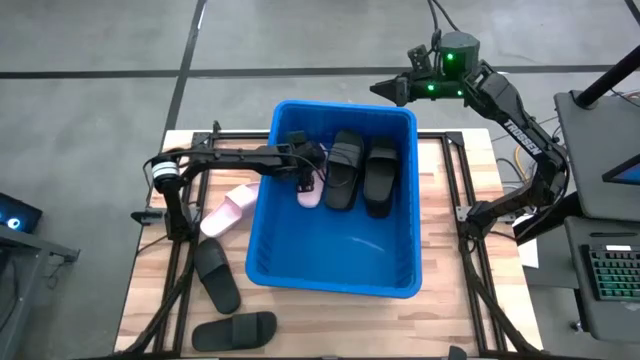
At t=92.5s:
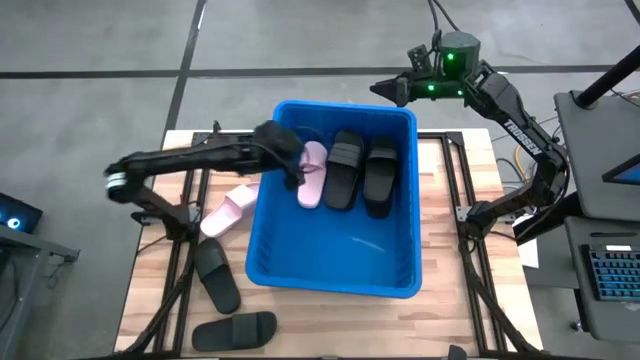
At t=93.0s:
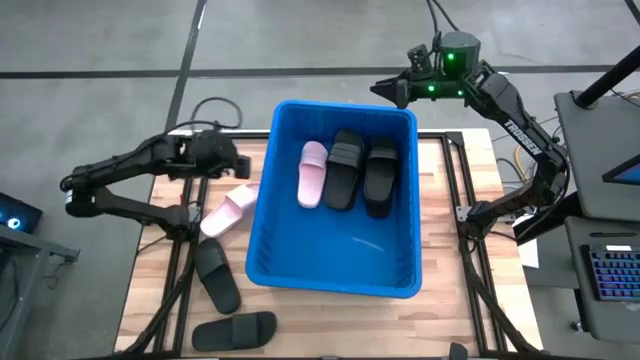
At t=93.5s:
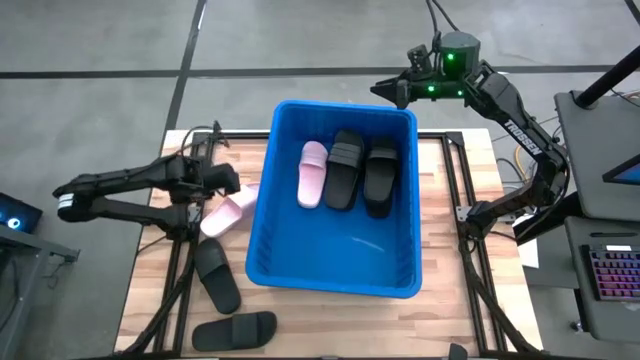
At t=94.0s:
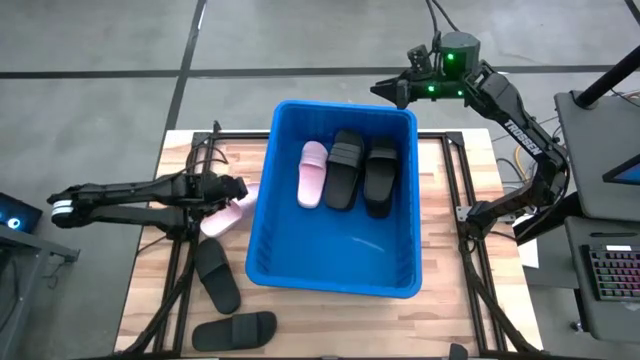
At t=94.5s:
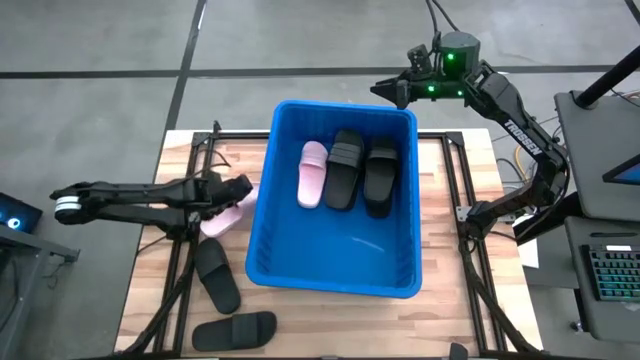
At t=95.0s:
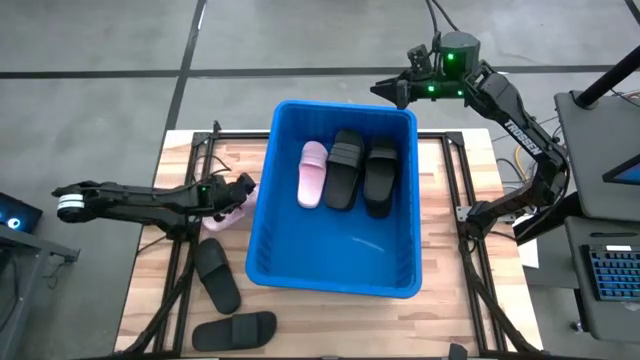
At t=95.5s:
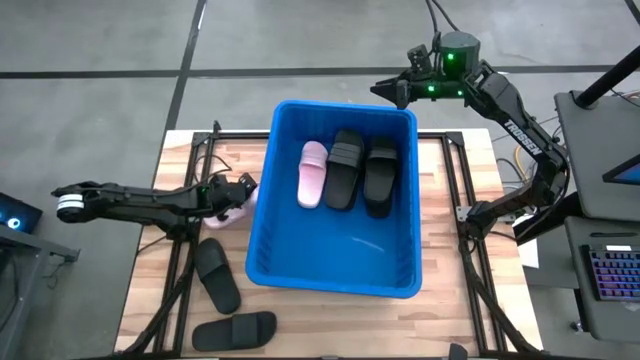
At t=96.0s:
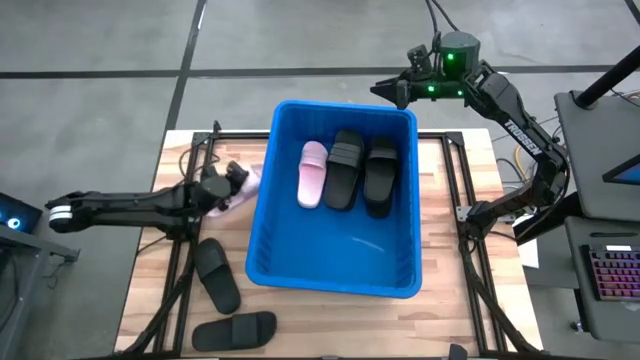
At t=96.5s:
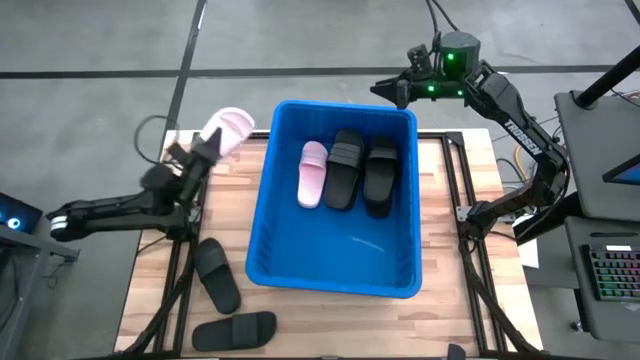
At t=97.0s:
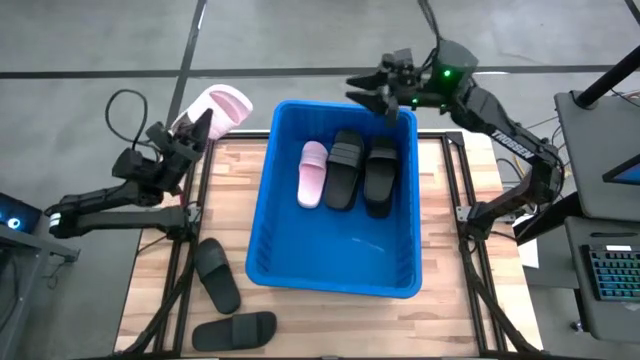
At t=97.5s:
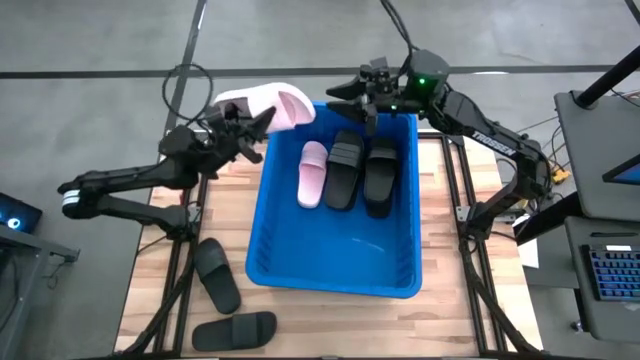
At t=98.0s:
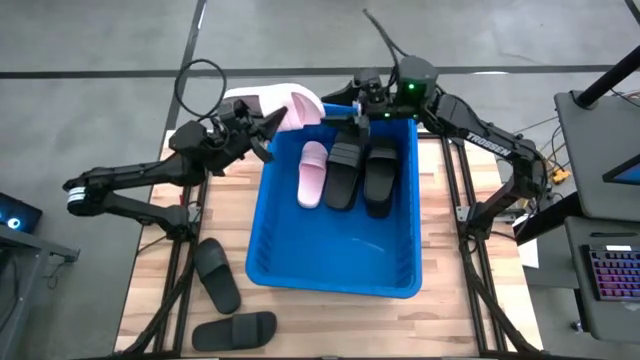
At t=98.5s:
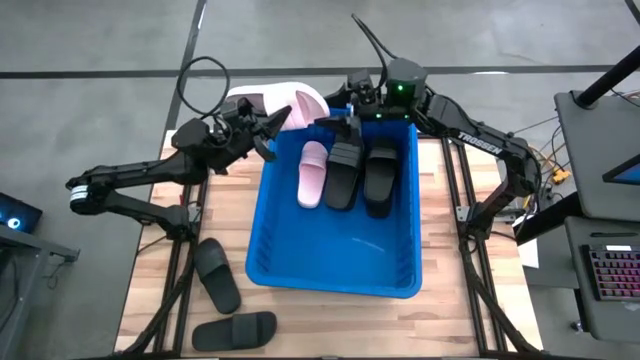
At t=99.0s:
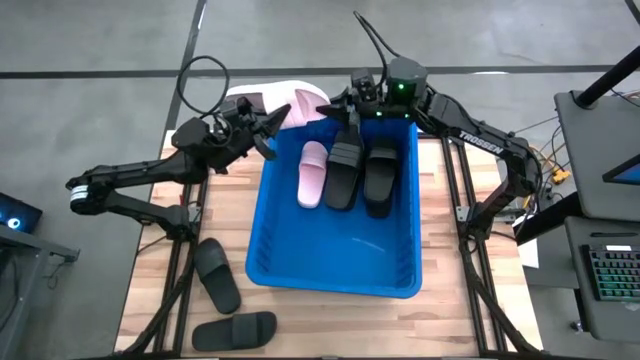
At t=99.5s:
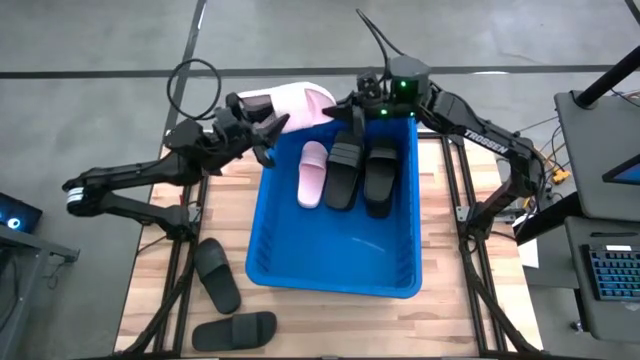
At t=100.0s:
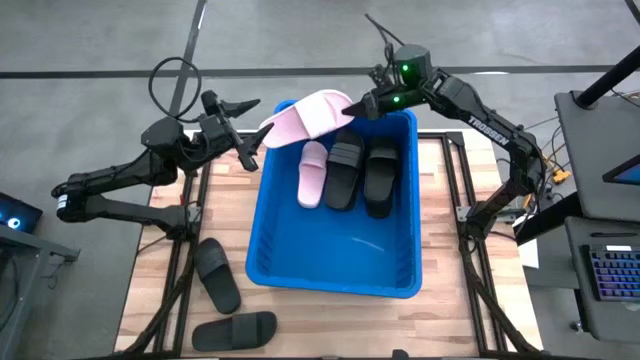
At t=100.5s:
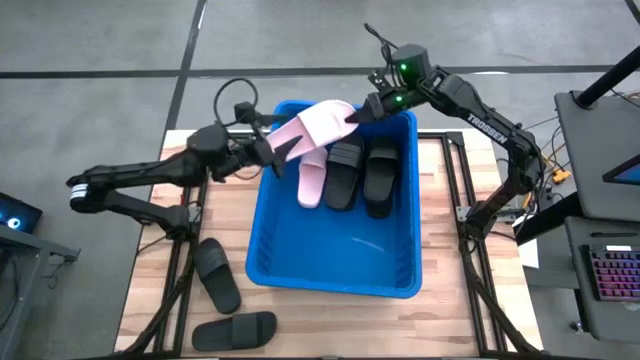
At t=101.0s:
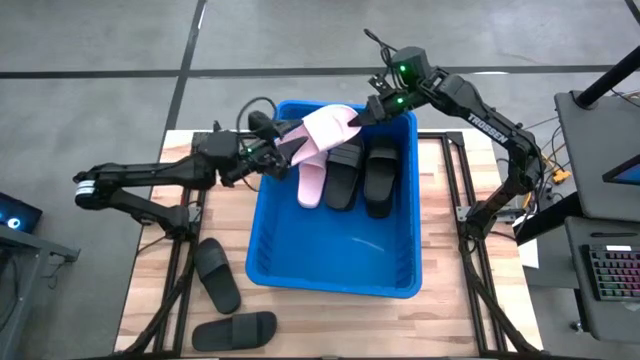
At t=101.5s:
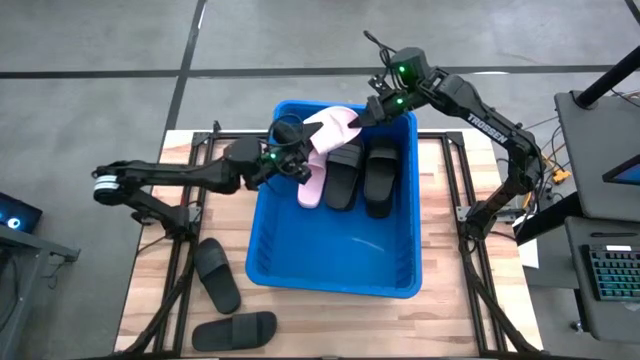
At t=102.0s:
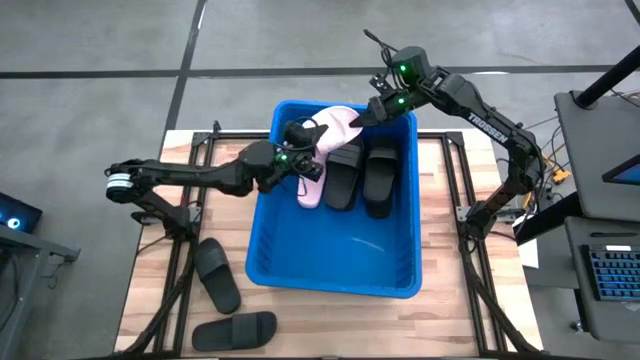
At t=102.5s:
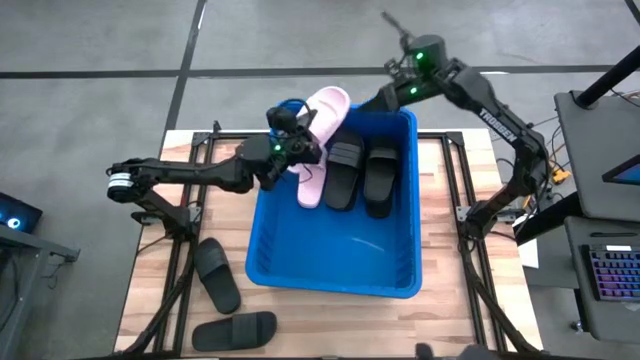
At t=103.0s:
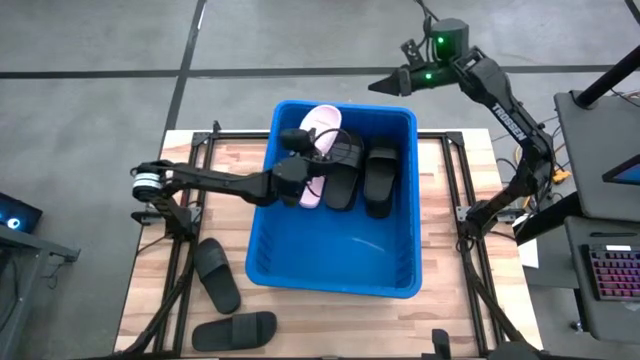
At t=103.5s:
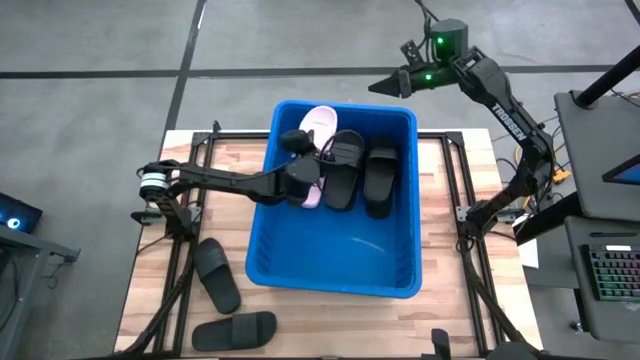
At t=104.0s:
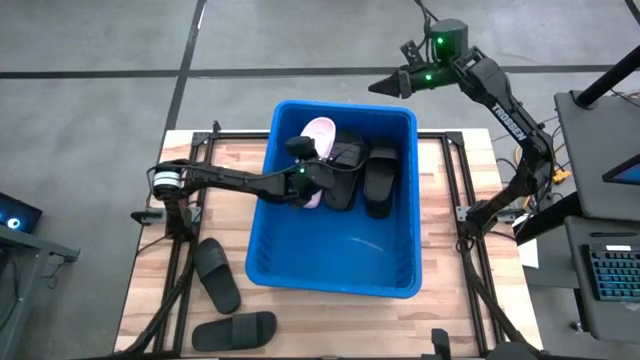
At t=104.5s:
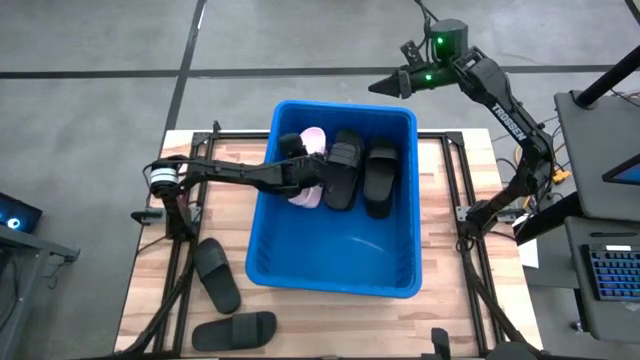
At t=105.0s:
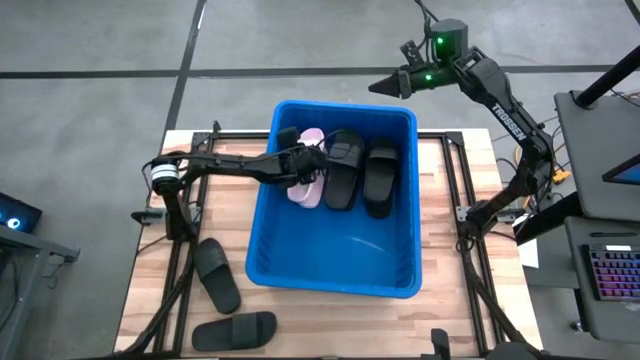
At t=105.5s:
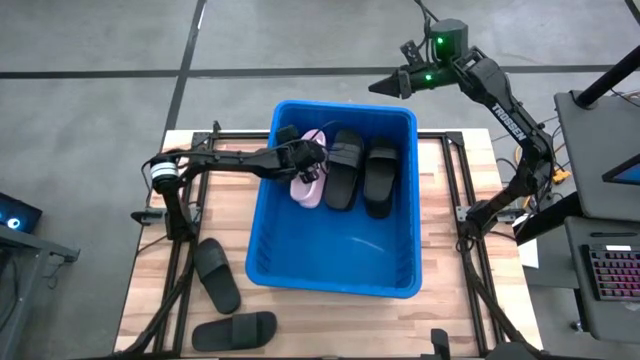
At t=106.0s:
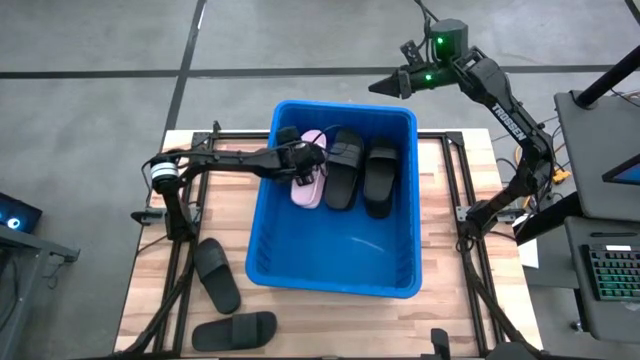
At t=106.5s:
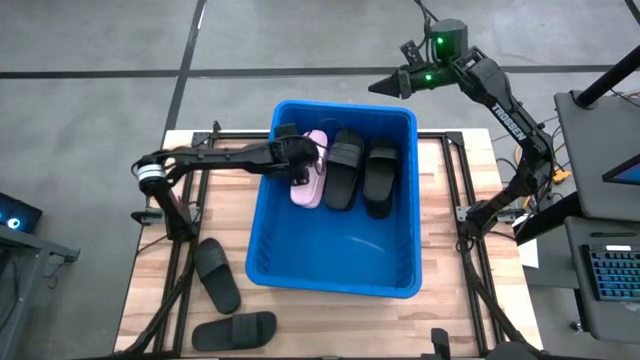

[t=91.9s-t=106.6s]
Task: Pick and place slides into bin
Put the pink slide into the blue bin

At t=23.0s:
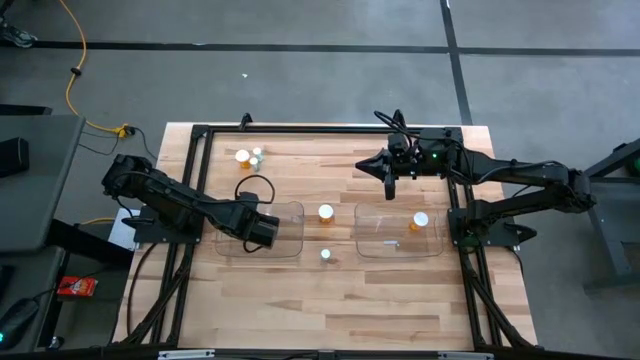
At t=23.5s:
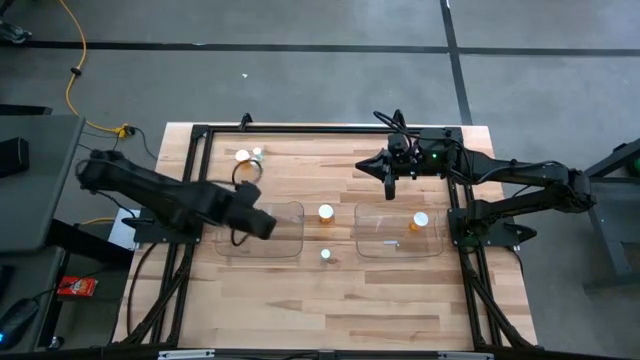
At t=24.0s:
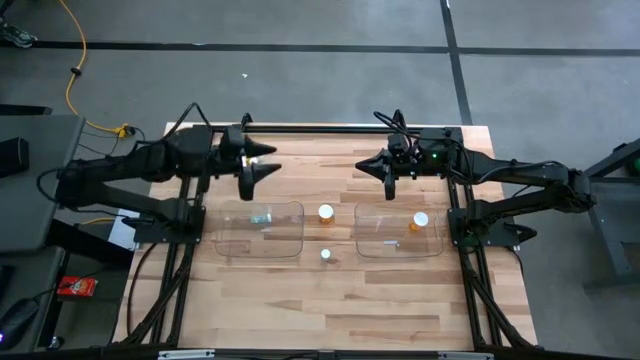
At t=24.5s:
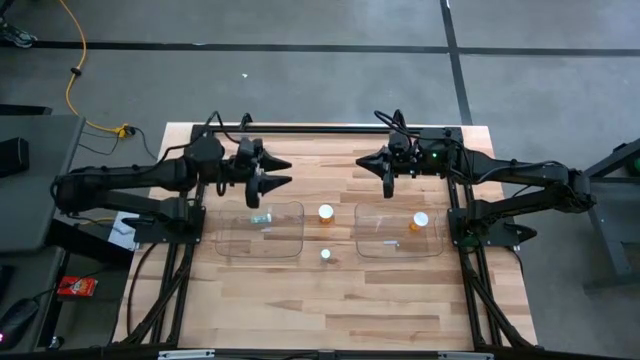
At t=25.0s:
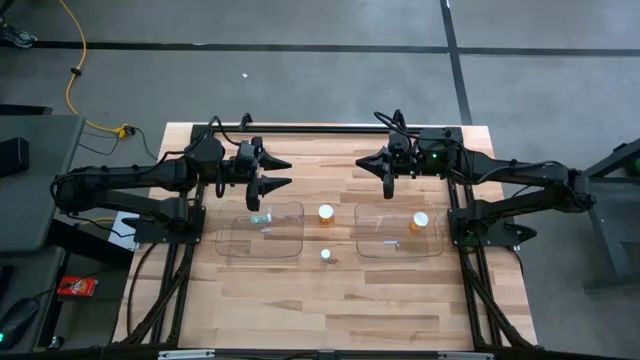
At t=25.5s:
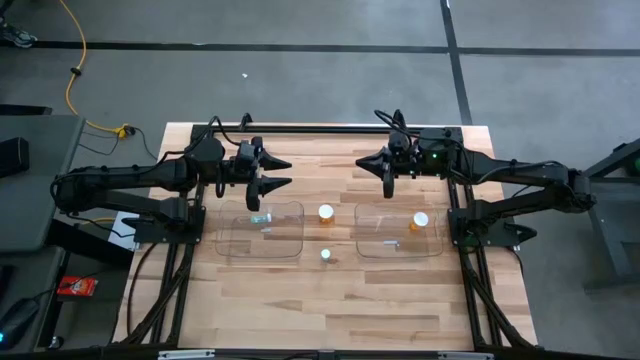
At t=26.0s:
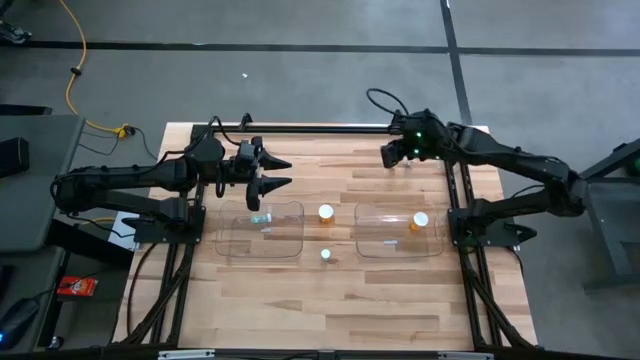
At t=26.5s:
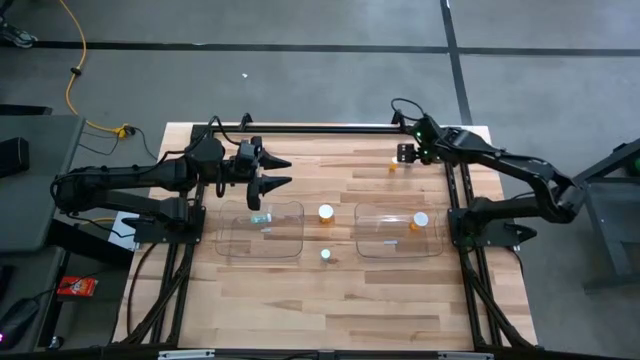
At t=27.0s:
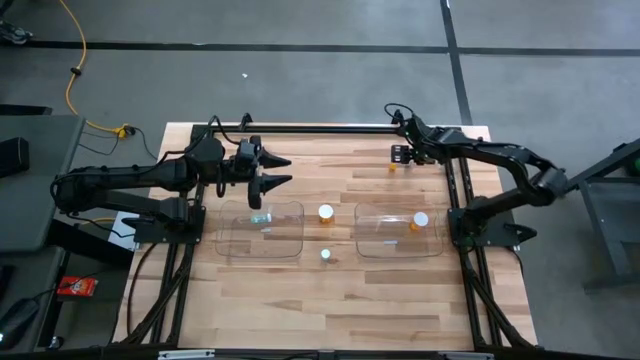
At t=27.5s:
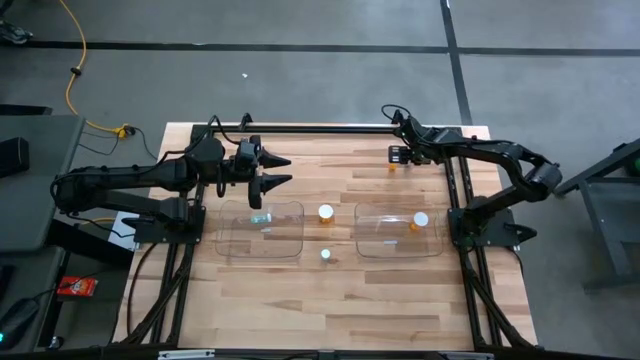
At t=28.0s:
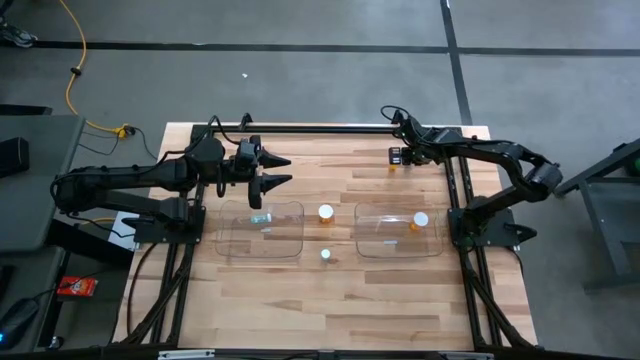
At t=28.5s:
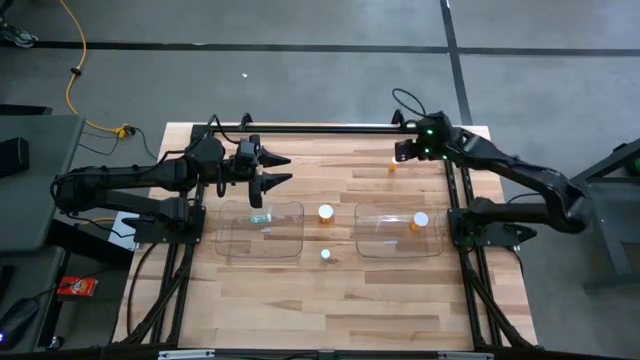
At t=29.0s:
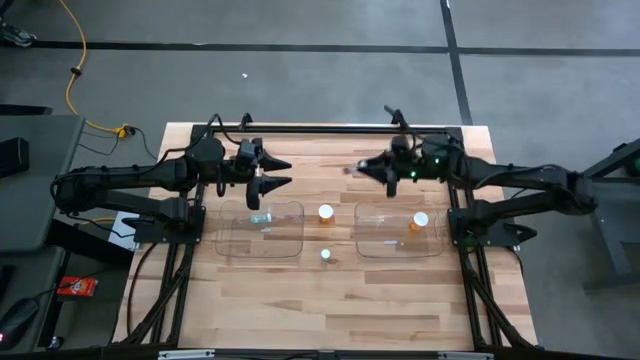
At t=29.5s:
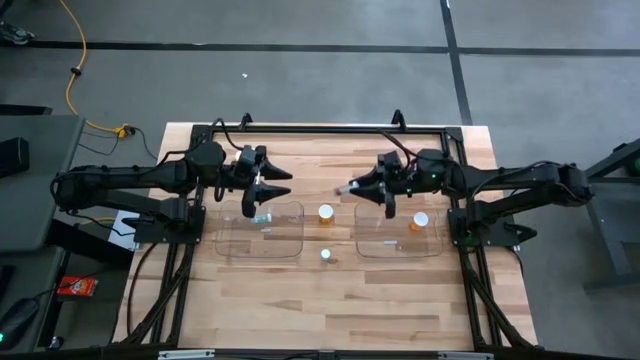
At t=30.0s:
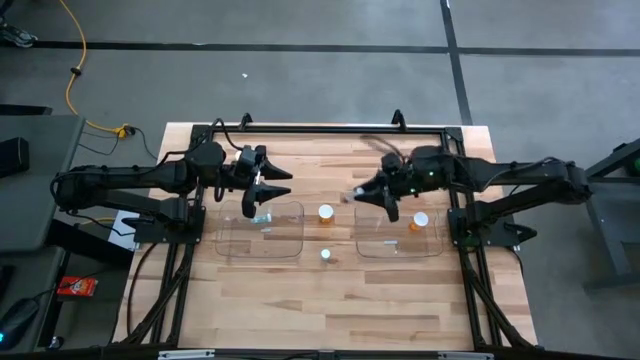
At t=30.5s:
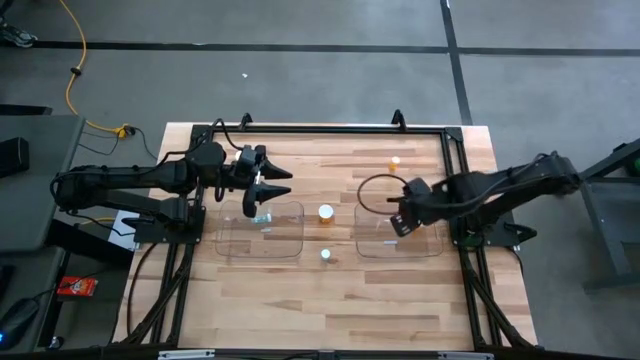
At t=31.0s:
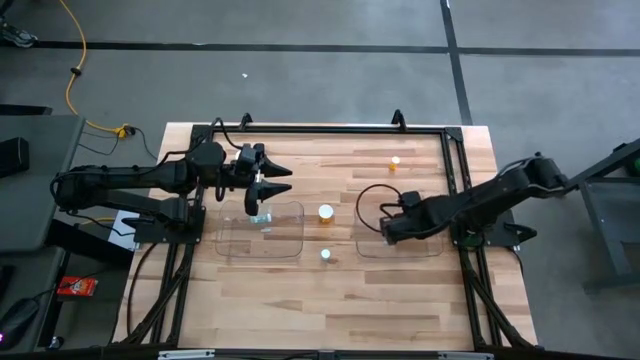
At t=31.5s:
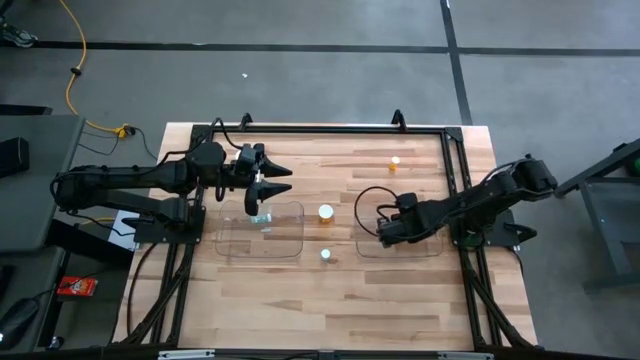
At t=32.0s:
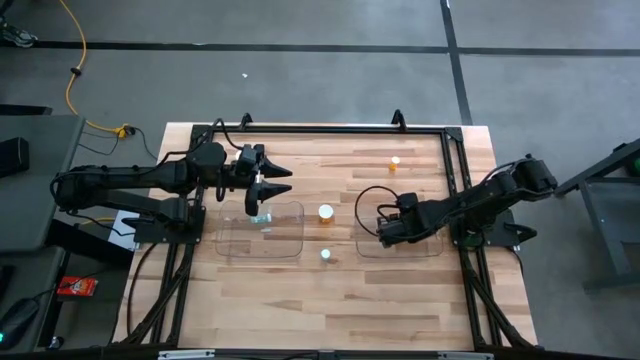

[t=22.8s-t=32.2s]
Task: Pick and place medicine bottles into bin by pill shape (circle, oval)
Put the right blue capsule bottle into the right transparent bin
